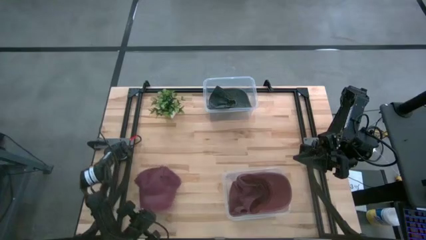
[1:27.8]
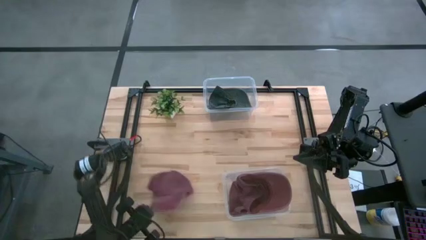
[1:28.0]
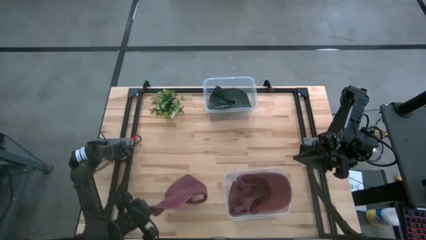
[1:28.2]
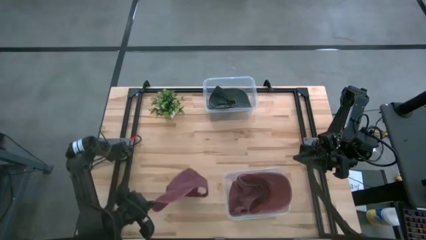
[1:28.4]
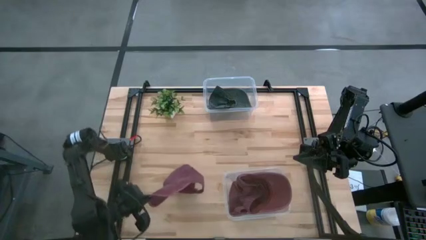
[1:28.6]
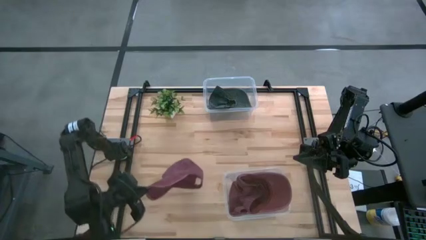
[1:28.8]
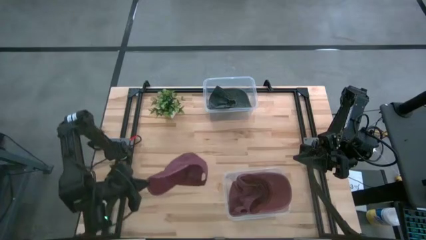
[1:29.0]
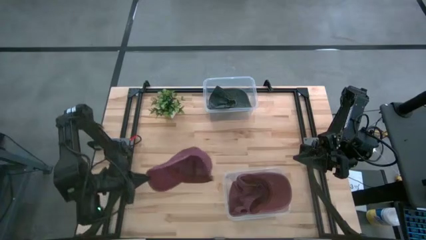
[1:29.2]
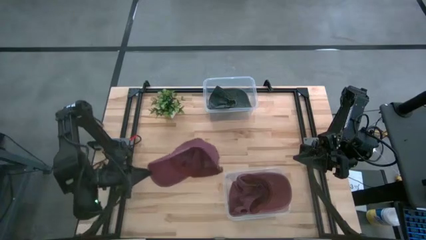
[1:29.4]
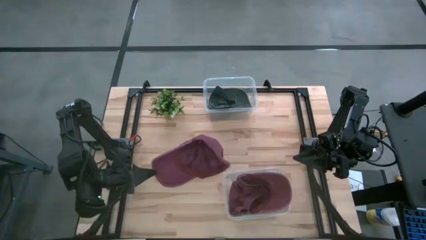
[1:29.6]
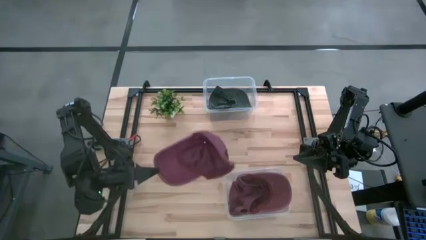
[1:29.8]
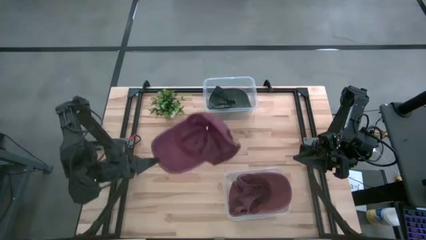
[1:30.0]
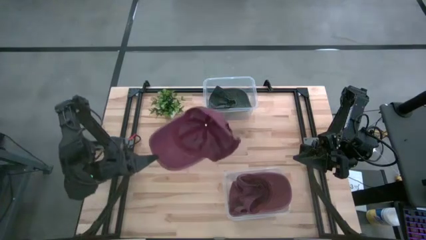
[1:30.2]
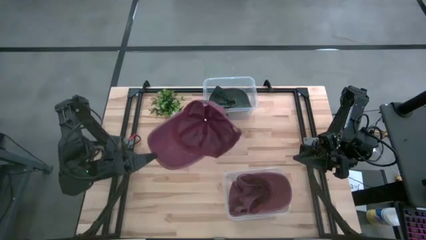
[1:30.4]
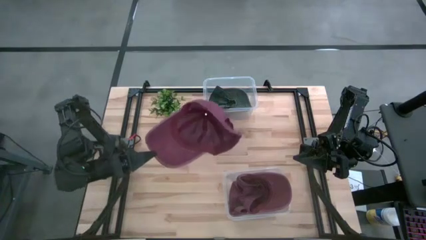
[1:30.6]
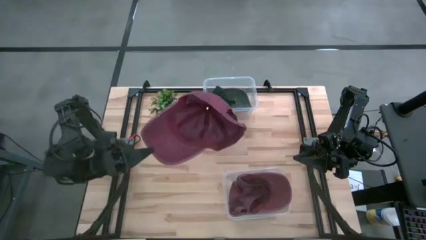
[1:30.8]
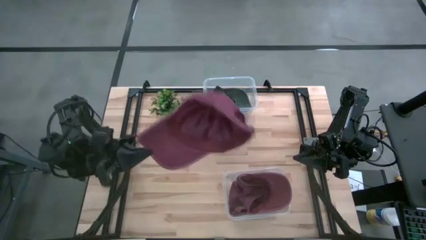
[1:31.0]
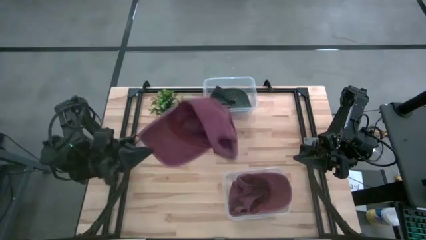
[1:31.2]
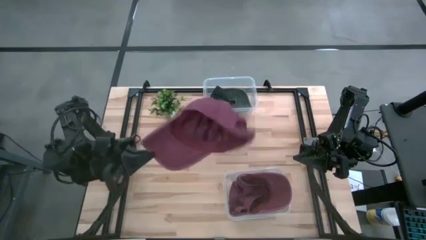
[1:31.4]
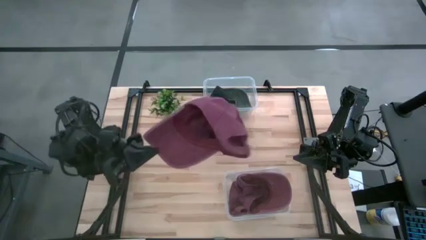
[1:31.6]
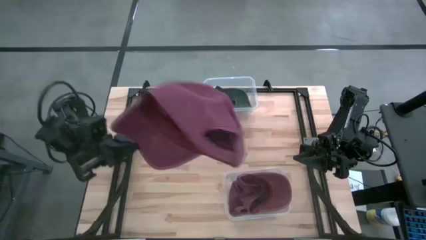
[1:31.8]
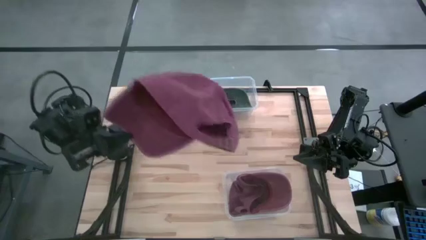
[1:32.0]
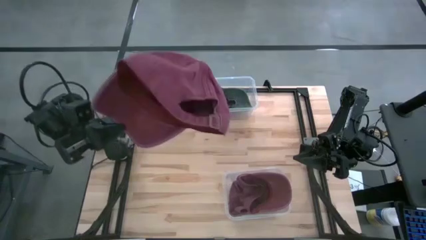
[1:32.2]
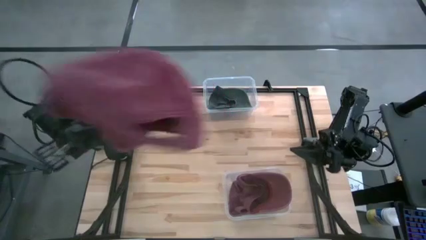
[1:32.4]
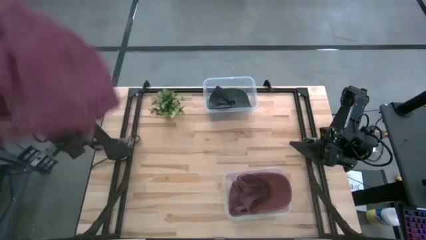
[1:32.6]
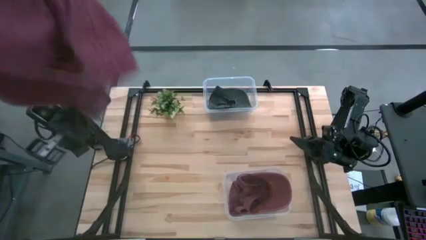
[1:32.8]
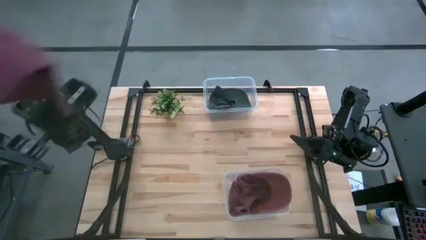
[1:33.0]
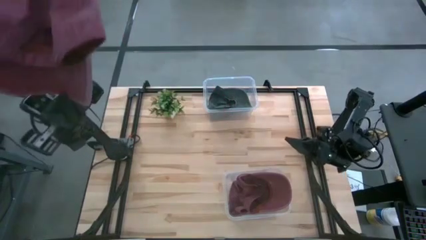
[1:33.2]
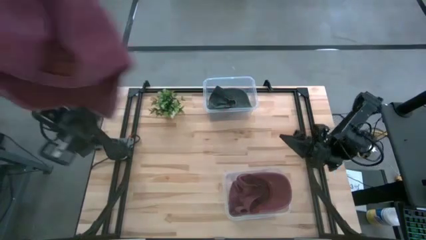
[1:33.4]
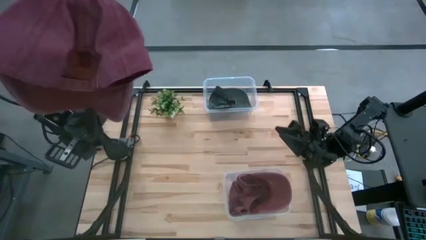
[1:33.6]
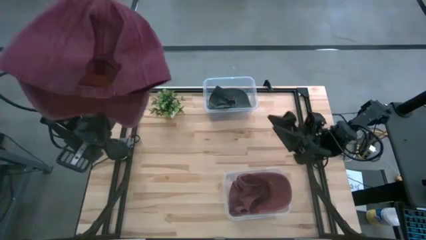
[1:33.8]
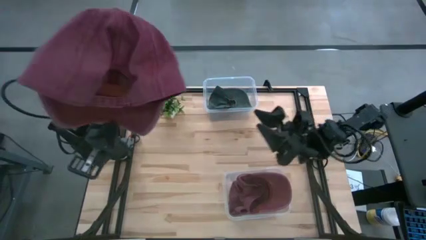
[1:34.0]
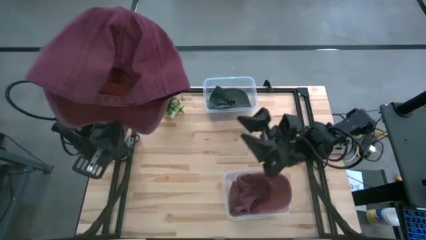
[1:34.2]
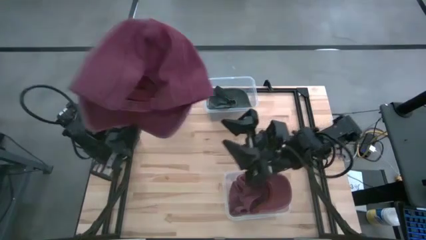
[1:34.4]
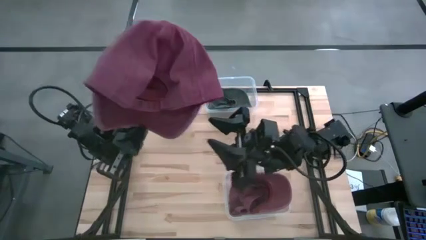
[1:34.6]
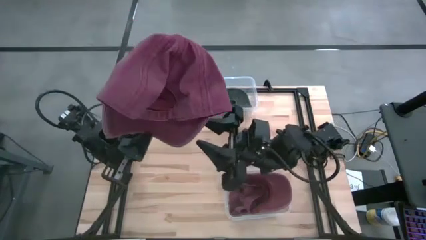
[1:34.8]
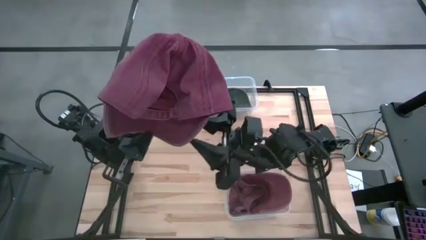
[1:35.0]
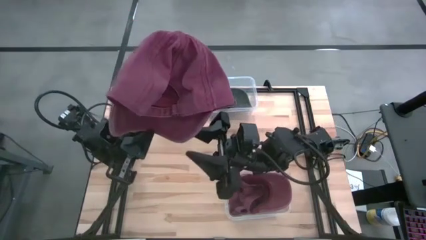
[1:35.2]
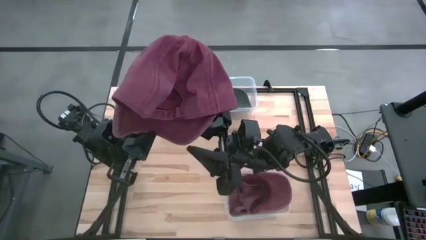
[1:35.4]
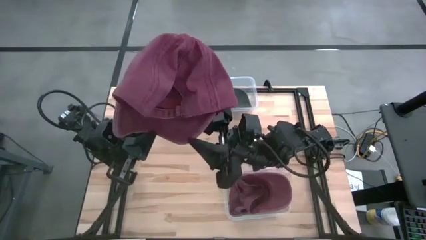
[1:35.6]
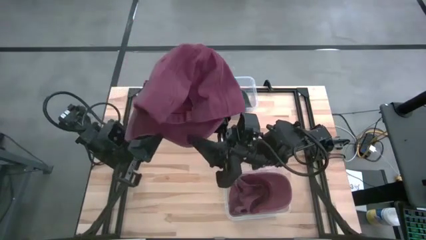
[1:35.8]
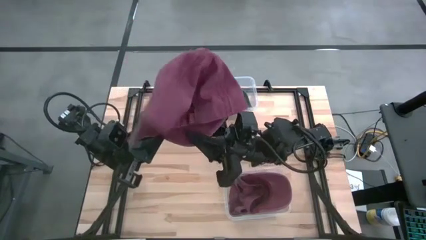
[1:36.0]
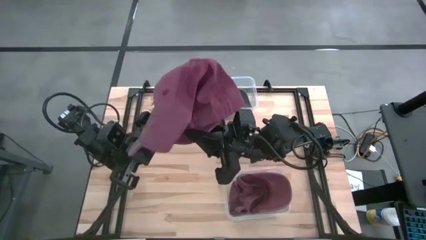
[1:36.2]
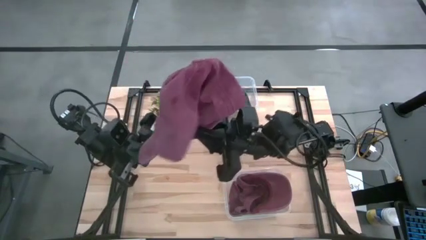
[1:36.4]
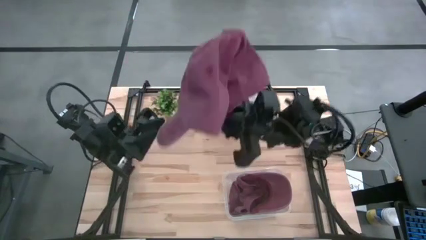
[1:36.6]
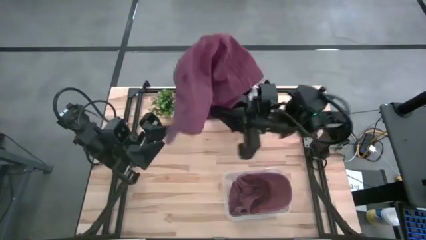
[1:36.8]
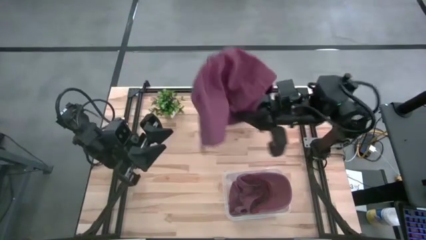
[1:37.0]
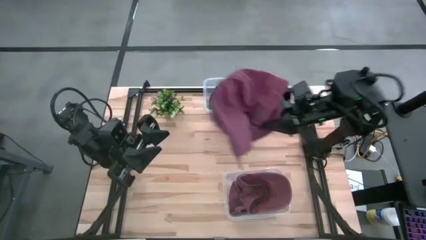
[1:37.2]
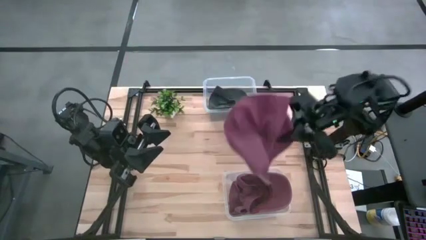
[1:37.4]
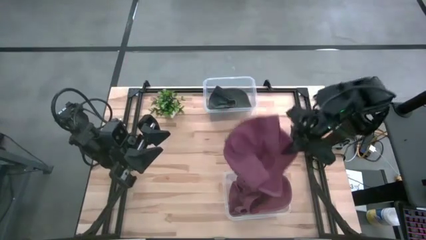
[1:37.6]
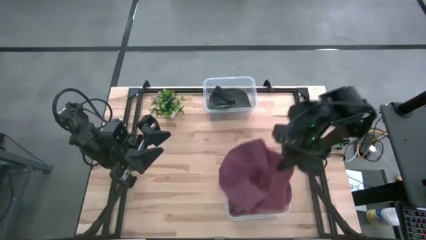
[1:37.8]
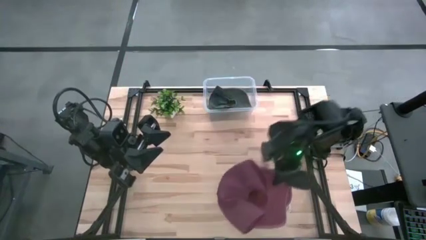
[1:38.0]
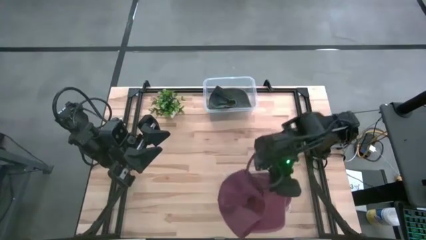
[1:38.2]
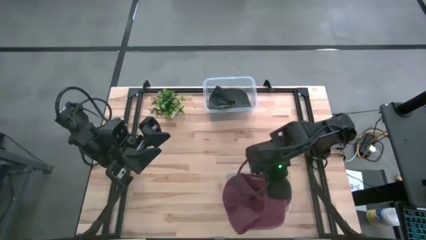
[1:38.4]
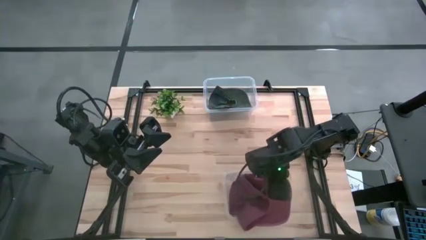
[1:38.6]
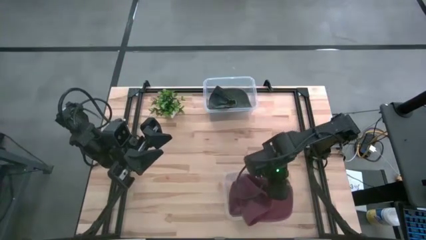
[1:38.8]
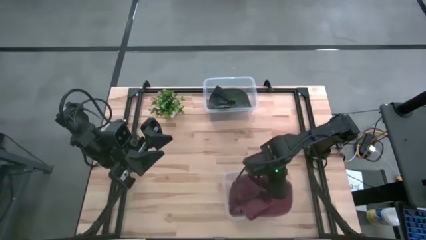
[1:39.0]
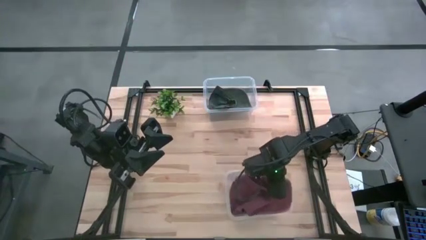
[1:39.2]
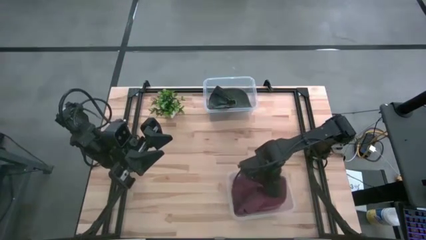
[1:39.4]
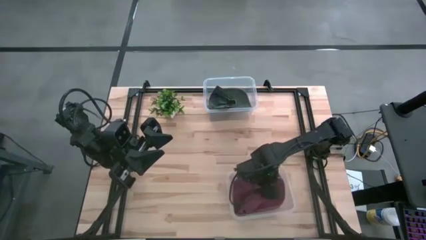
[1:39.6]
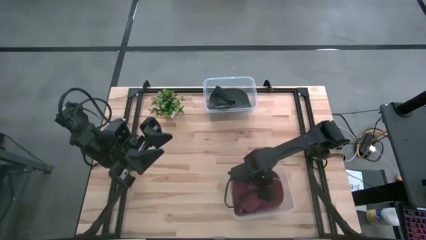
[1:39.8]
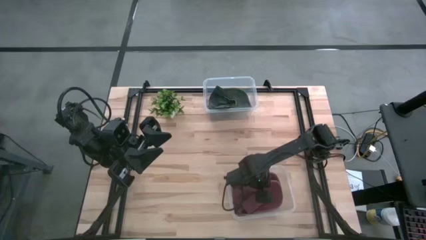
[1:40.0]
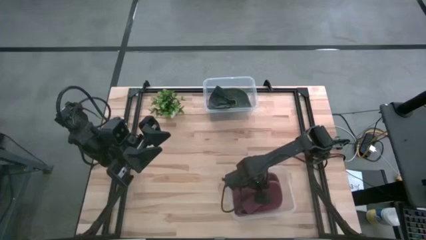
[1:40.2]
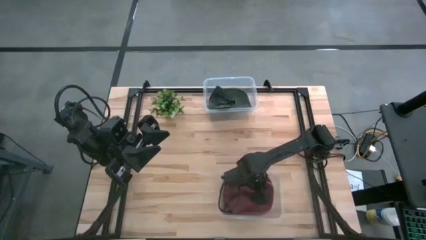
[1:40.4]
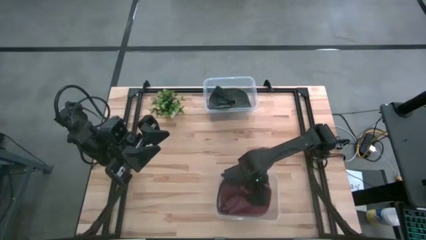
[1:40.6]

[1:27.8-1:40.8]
Task: Pick & Place hat
Put the maroon cap into the bottom transparent bin

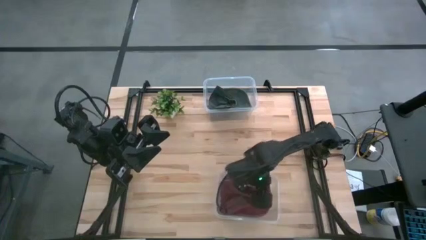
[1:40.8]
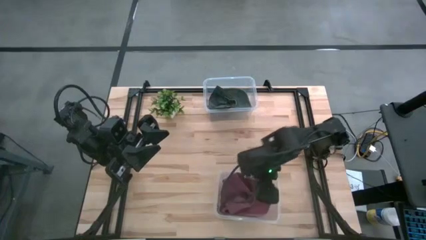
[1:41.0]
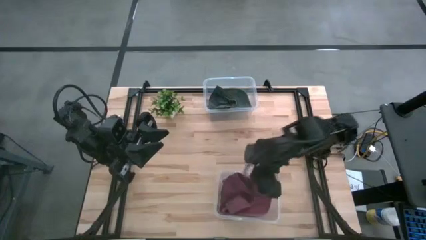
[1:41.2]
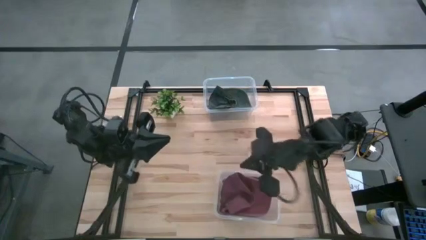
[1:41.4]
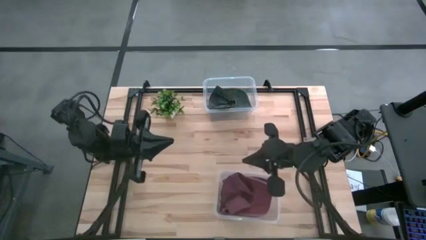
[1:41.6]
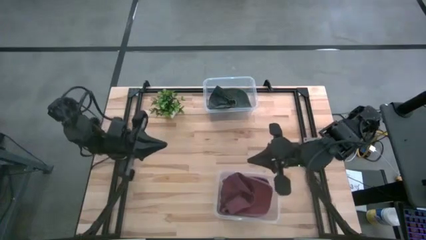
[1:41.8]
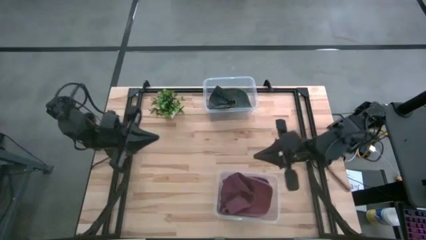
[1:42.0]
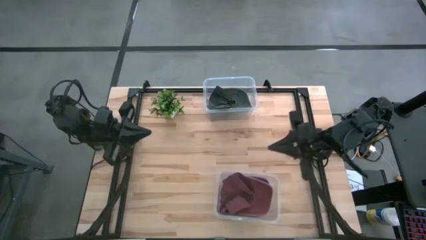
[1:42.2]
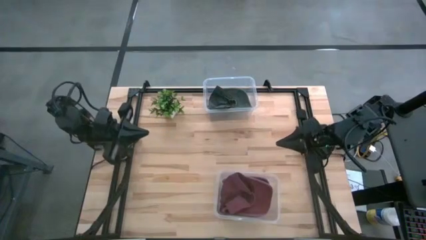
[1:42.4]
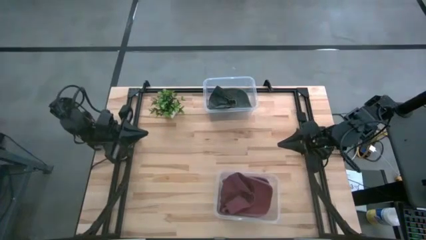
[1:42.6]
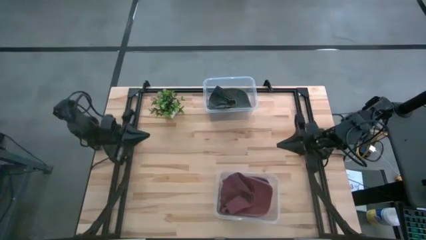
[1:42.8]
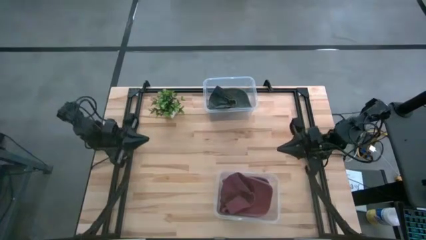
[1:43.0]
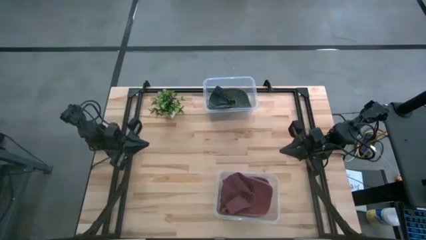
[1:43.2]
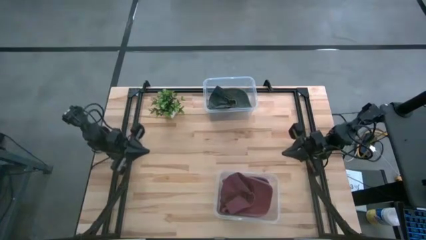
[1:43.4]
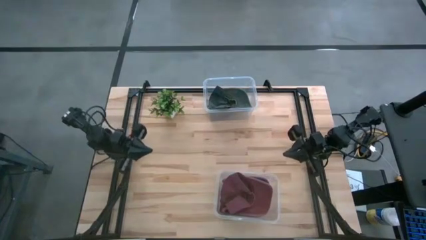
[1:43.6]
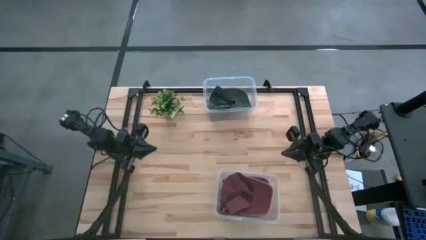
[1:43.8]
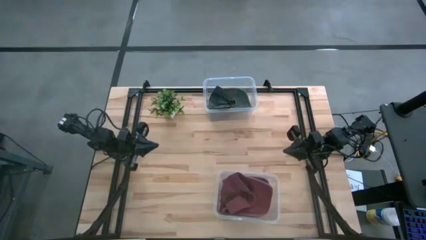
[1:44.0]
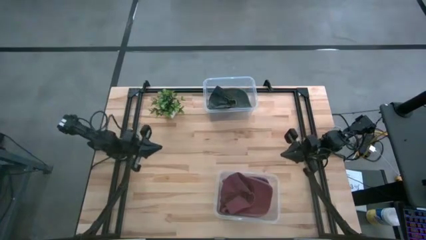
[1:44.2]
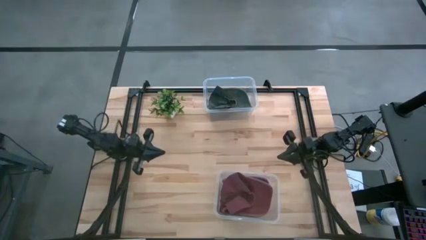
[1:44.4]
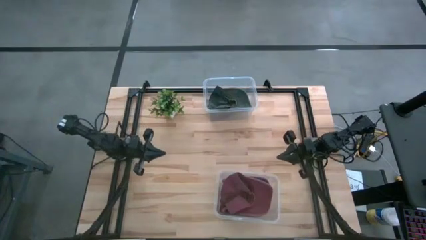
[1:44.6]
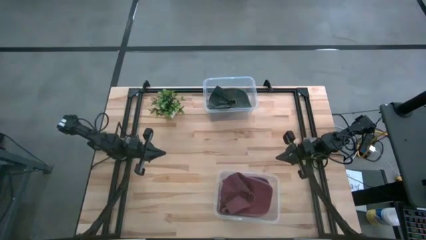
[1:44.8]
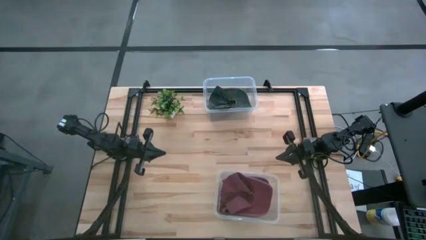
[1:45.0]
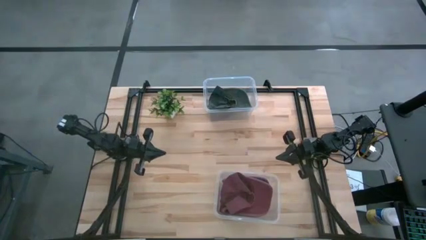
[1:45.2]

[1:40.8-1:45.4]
Return to Home Position
